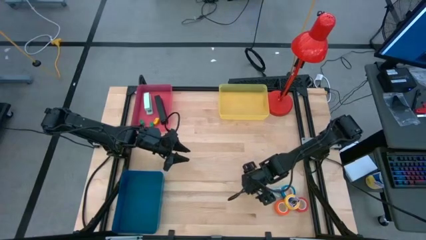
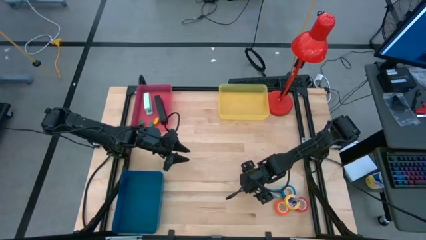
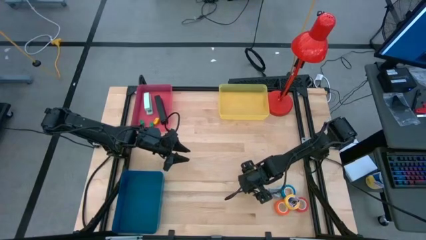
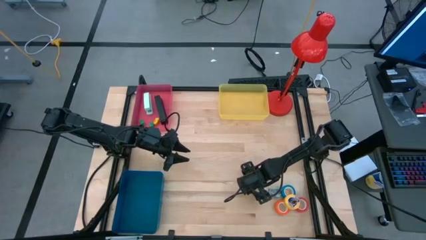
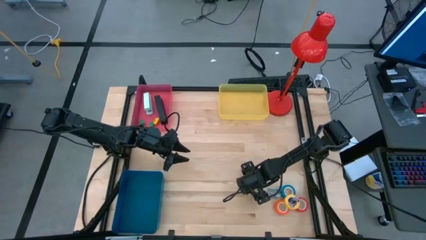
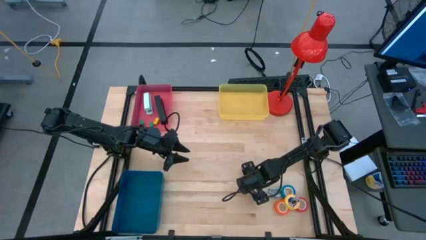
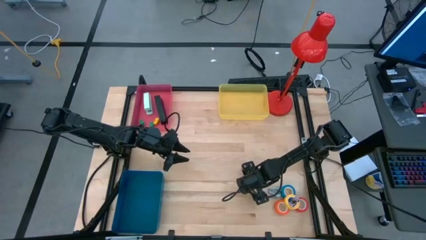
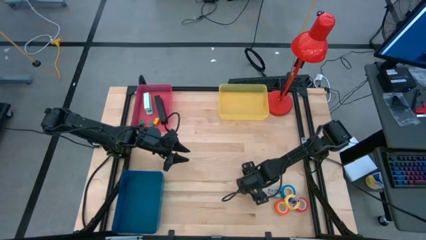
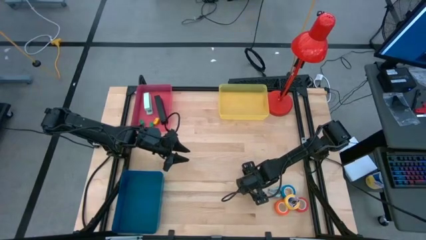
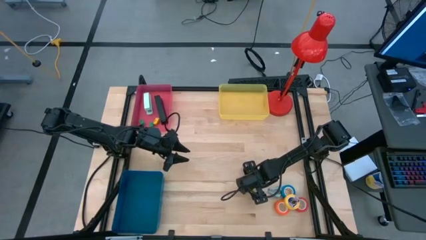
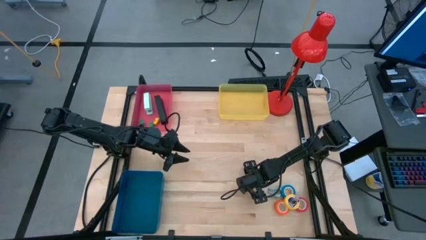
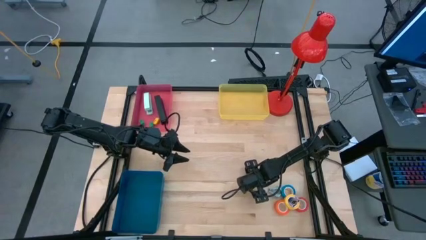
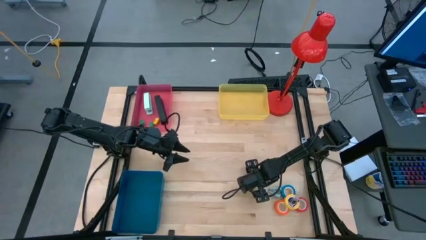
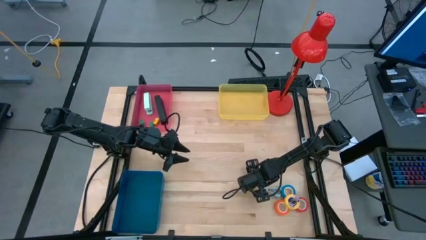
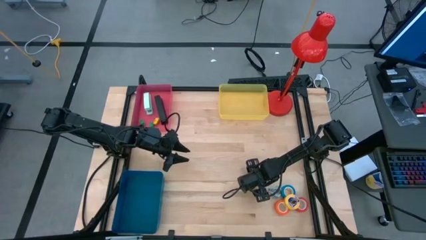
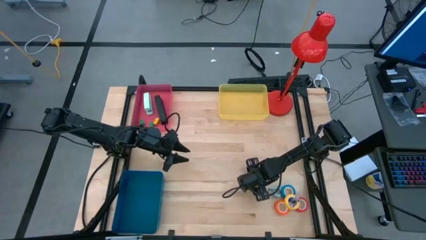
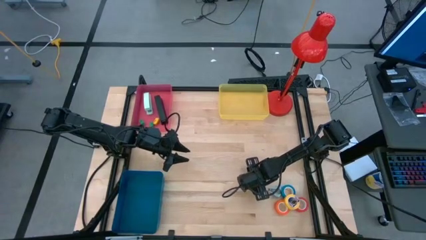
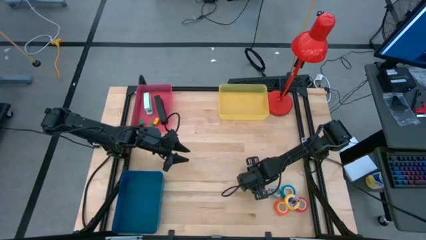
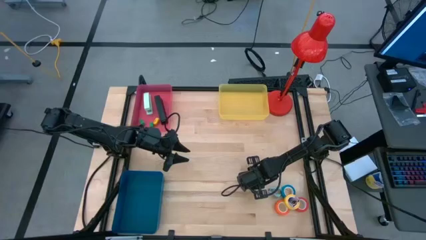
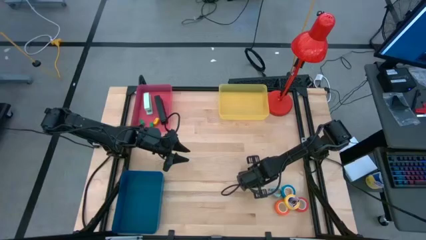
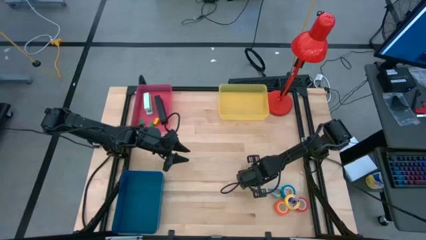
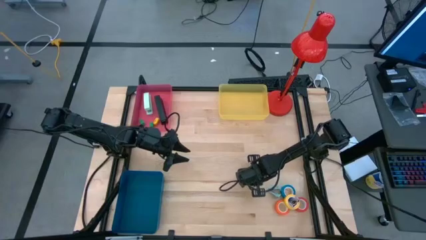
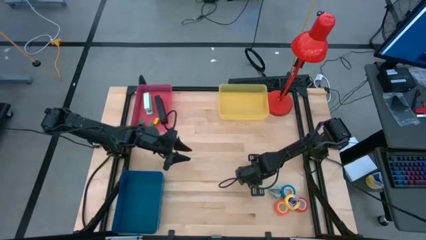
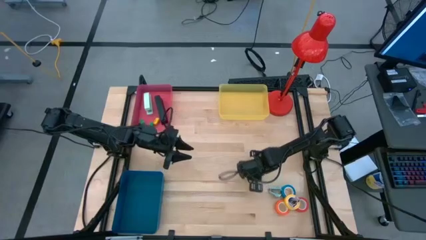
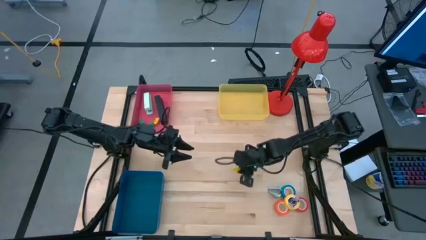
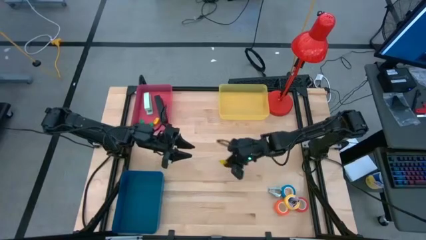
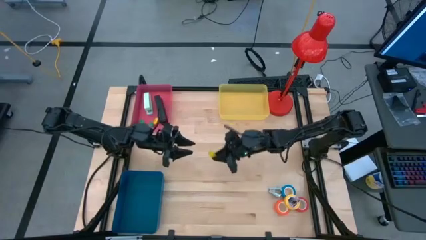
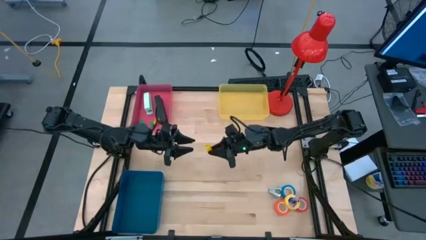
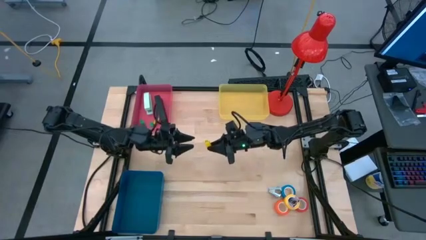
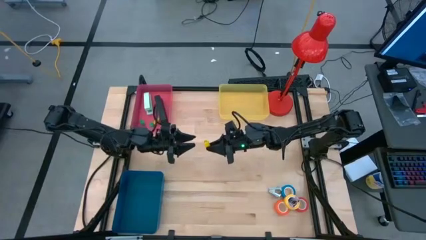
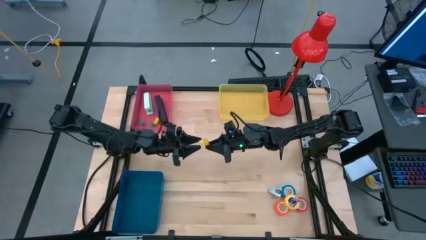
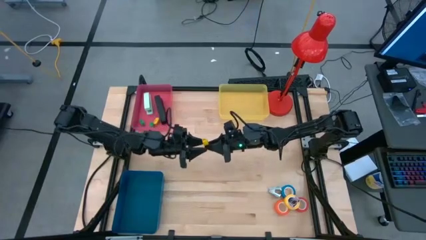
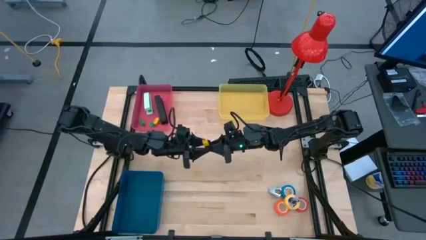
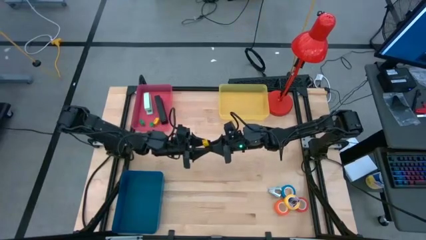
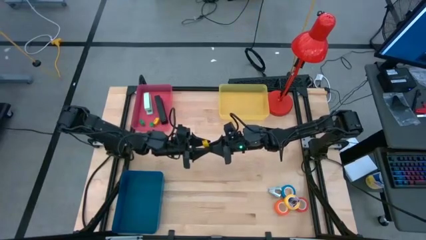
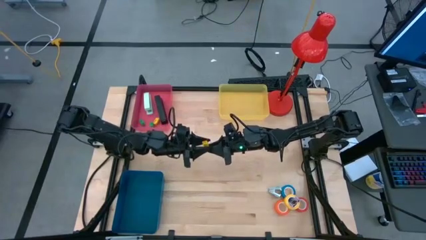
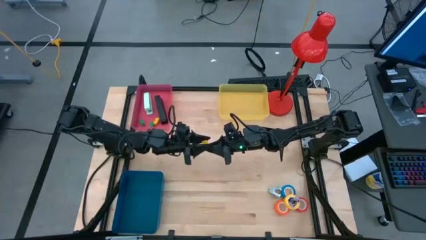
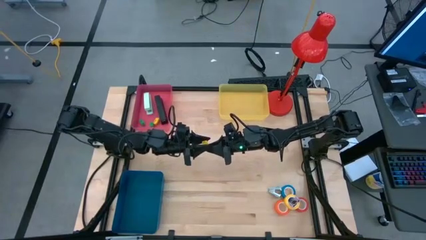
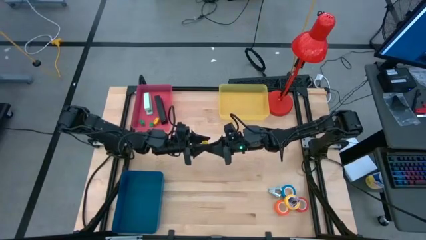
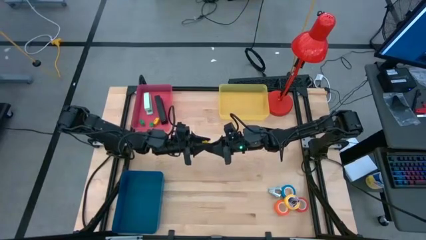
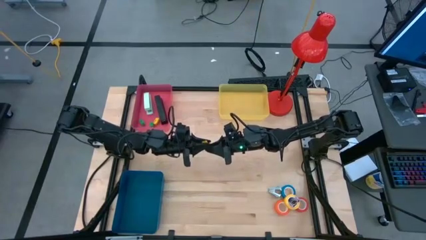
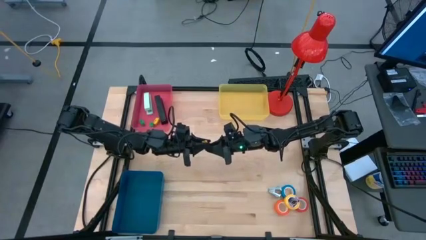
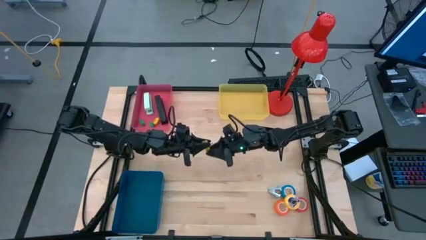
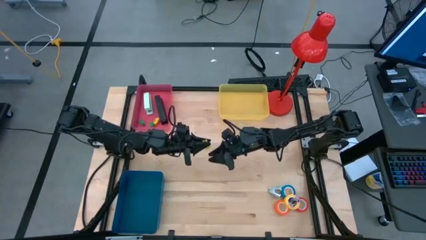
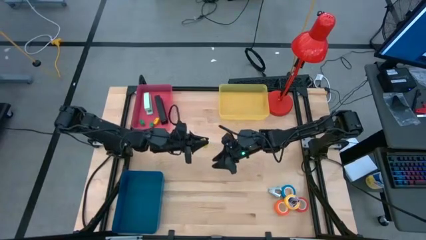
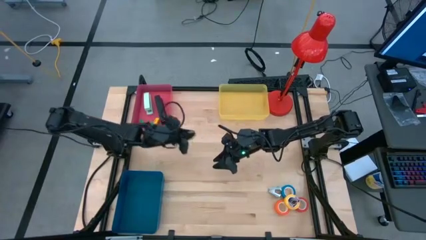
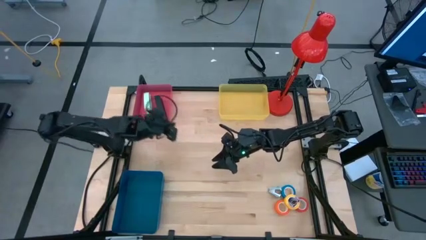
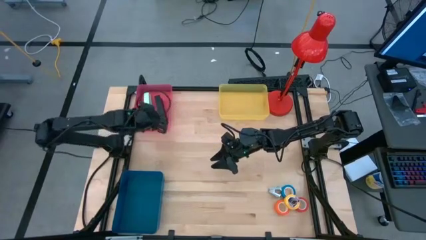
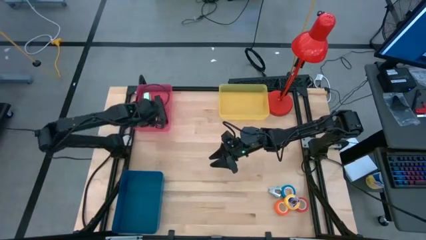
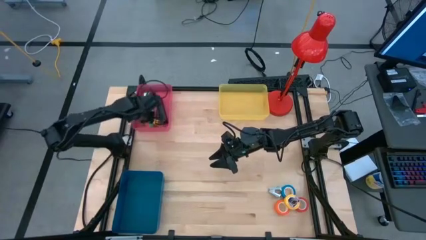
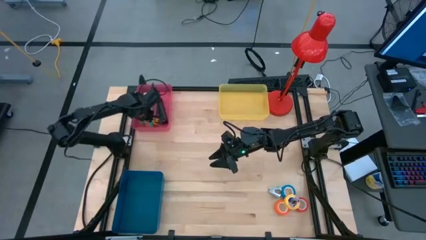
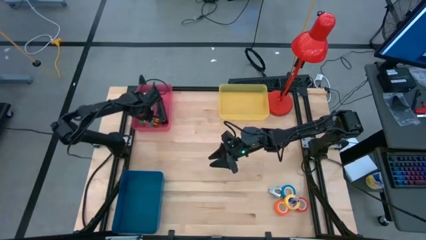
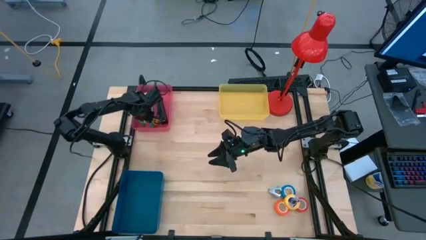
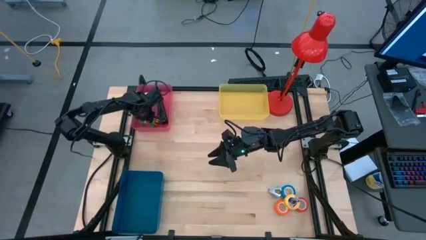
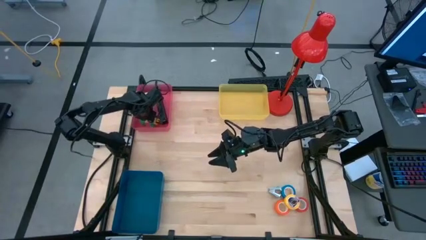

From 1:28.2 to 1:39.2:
Task: Pick and place Stapler, Stapler remover, tape
Put the yellow stapler into the red bin
